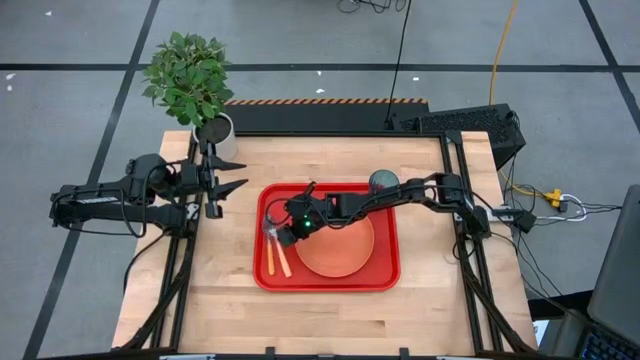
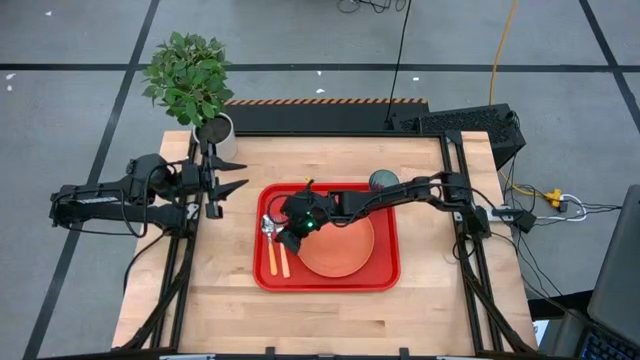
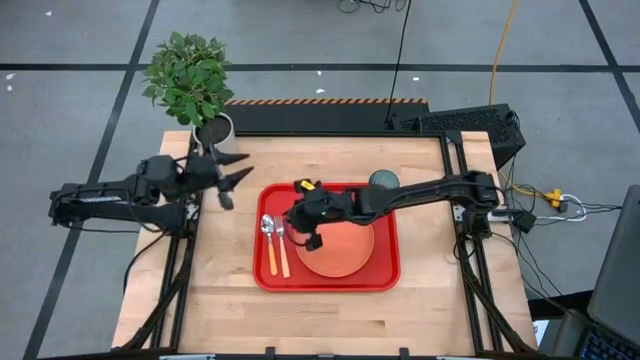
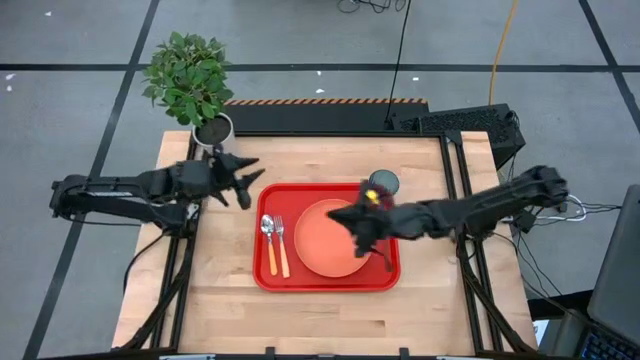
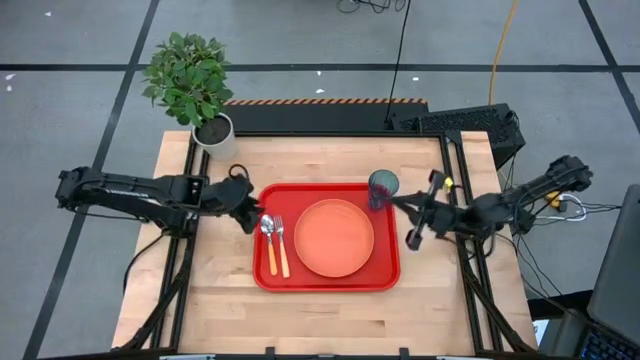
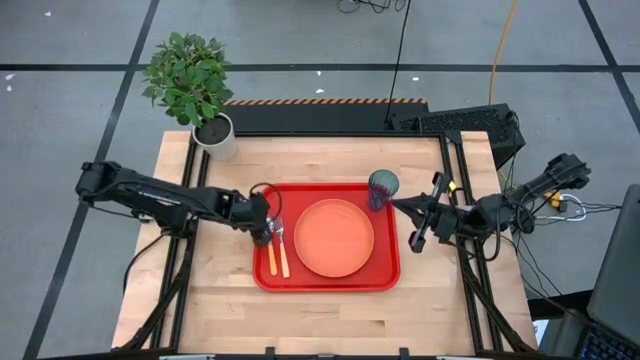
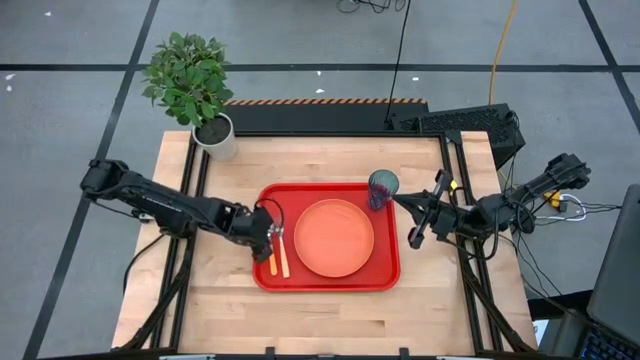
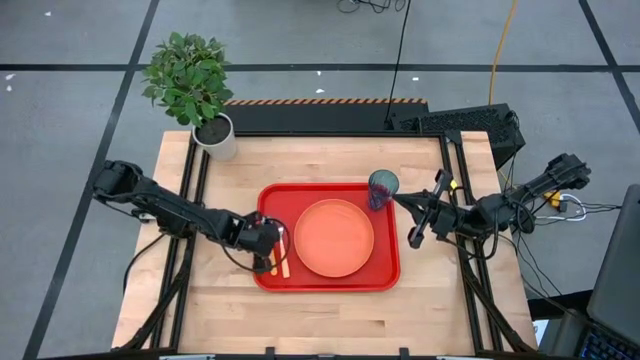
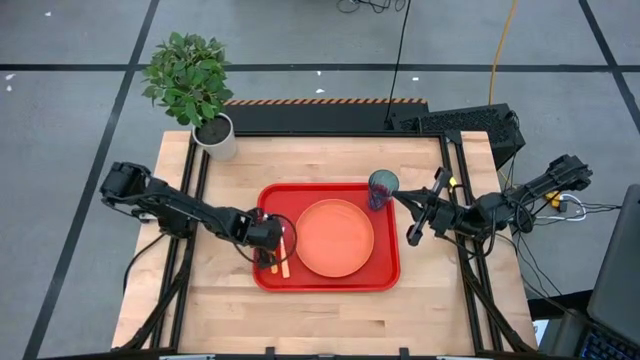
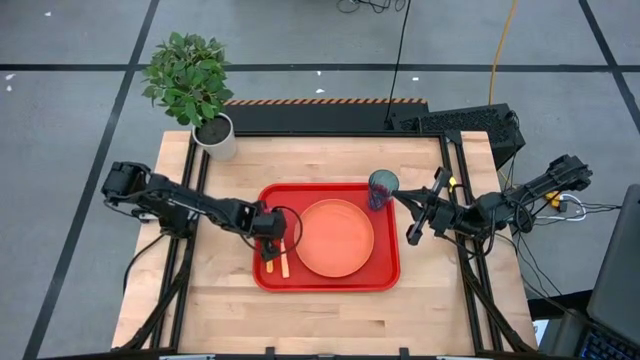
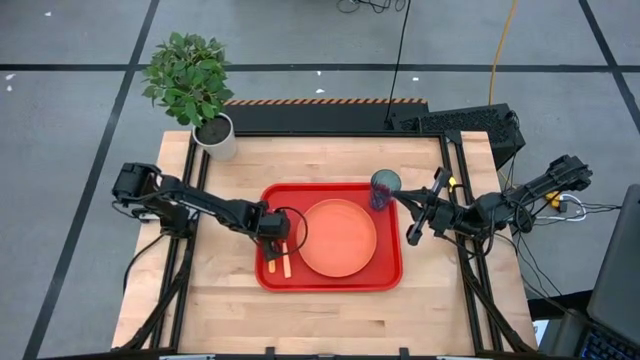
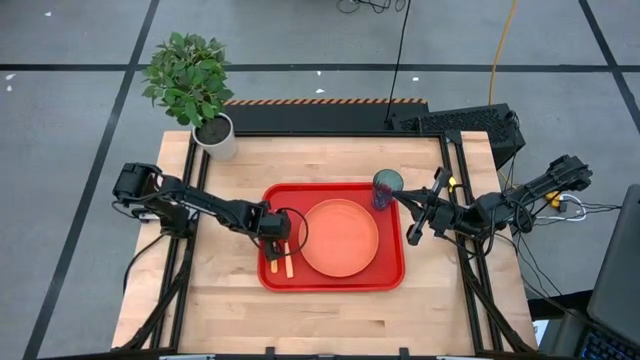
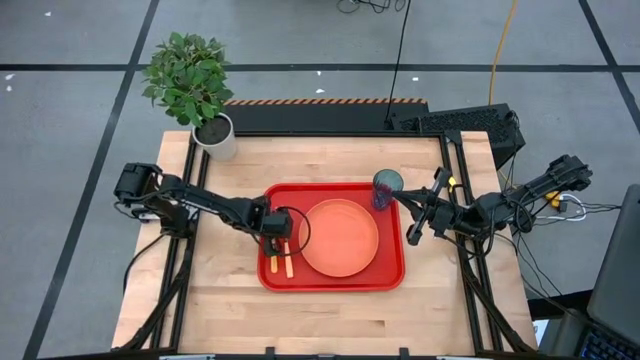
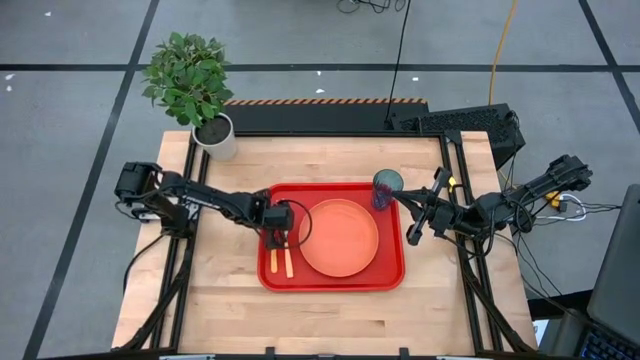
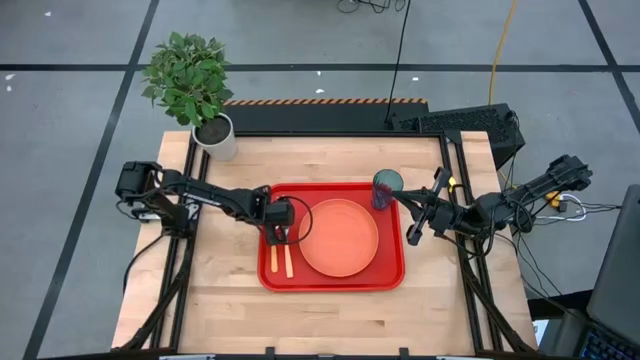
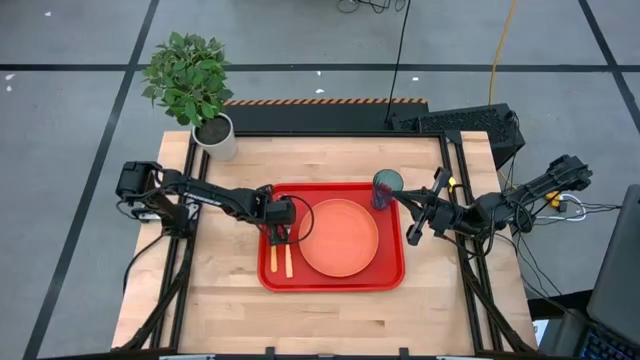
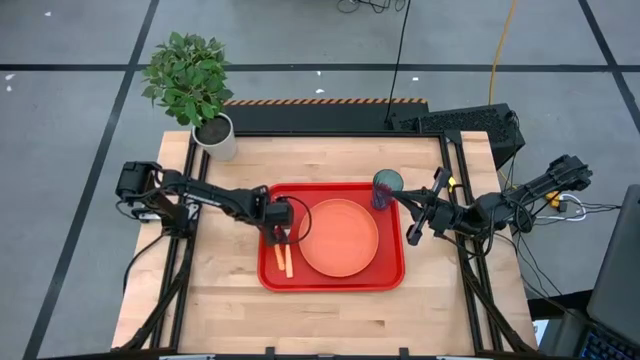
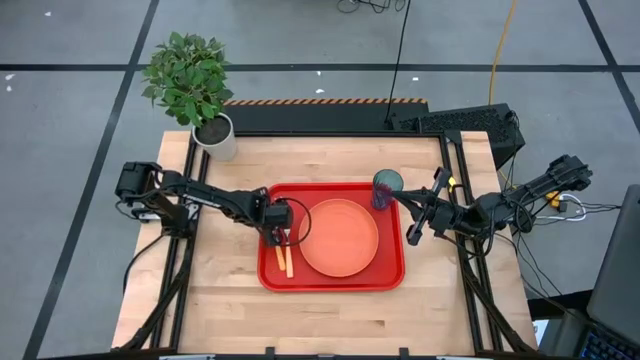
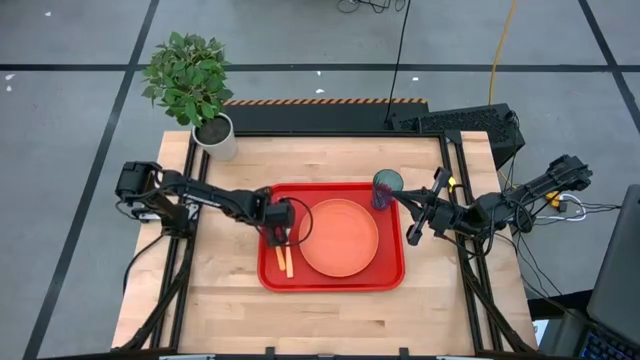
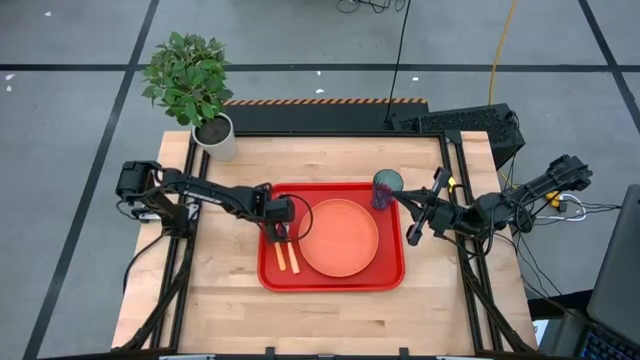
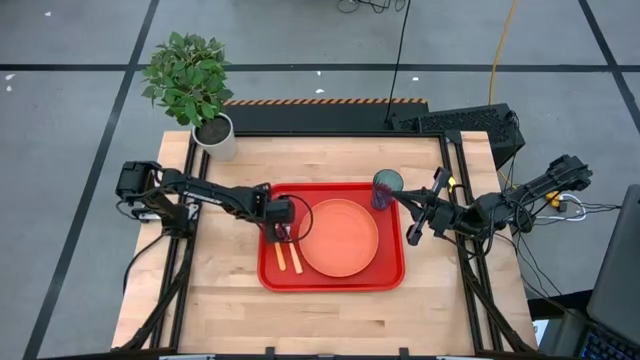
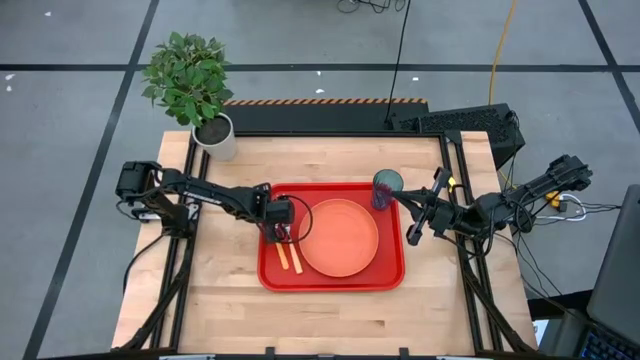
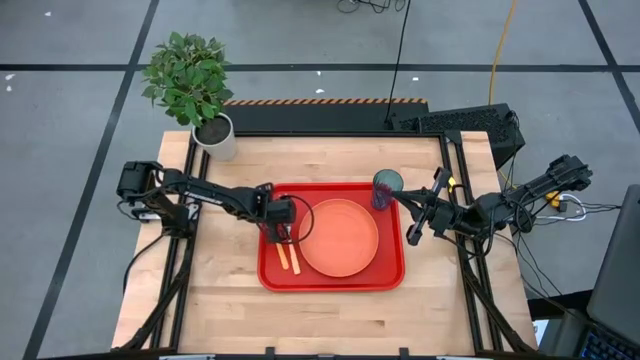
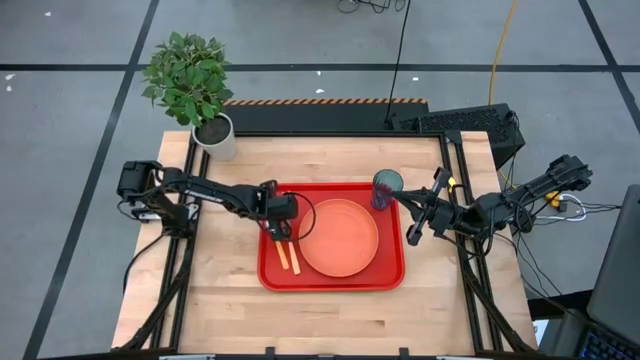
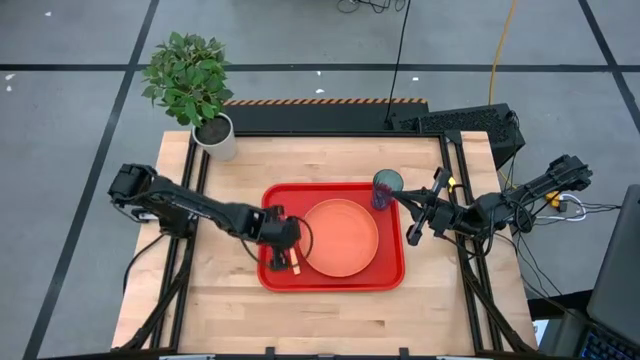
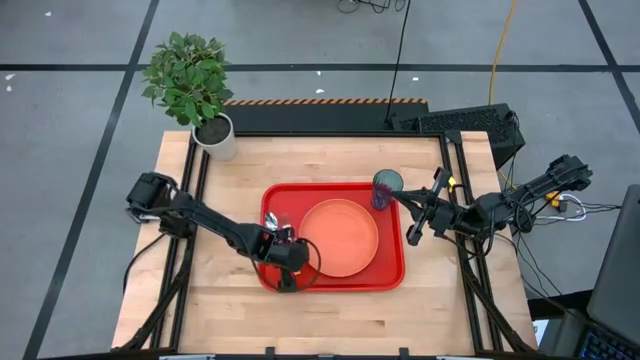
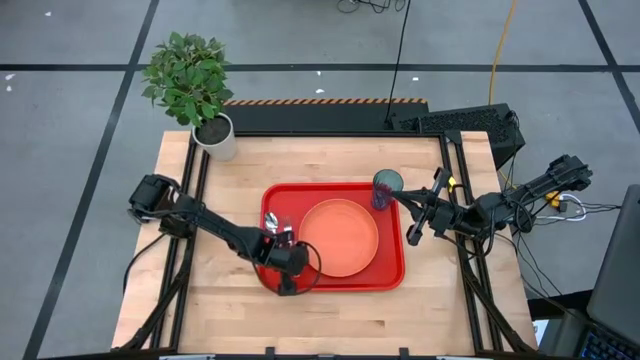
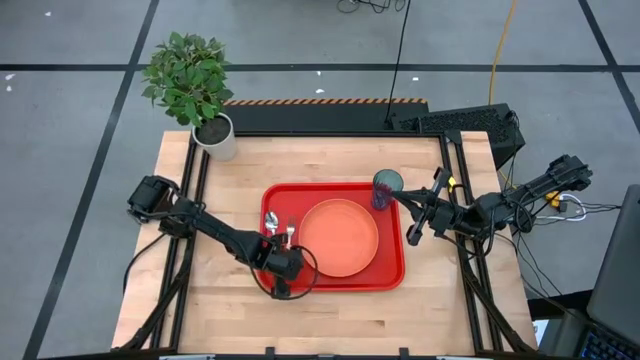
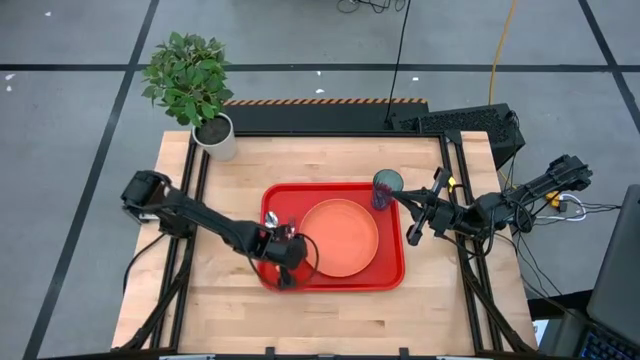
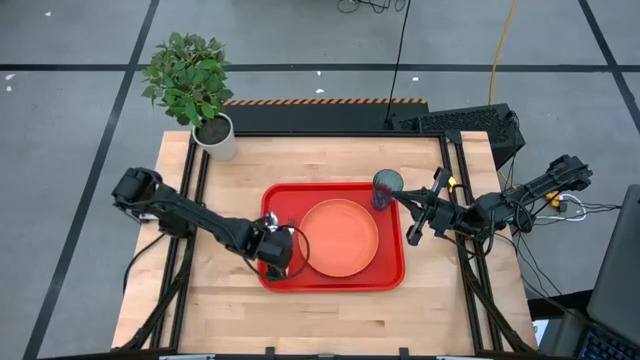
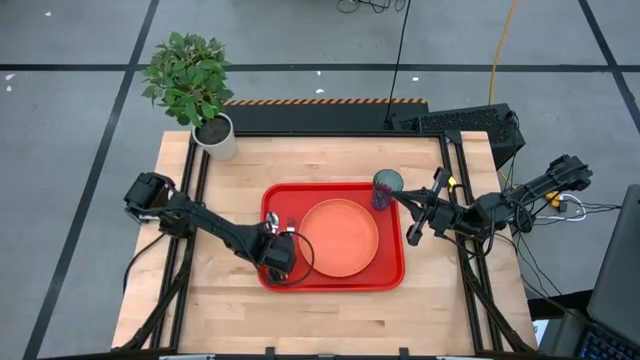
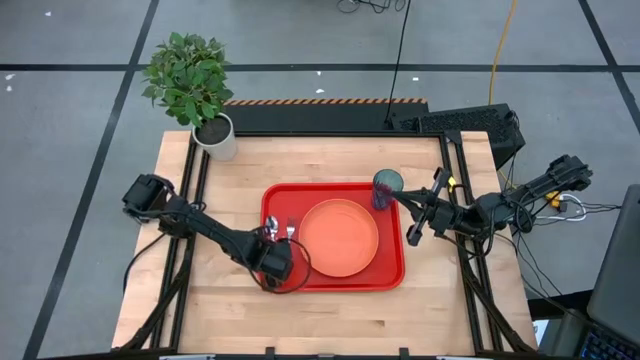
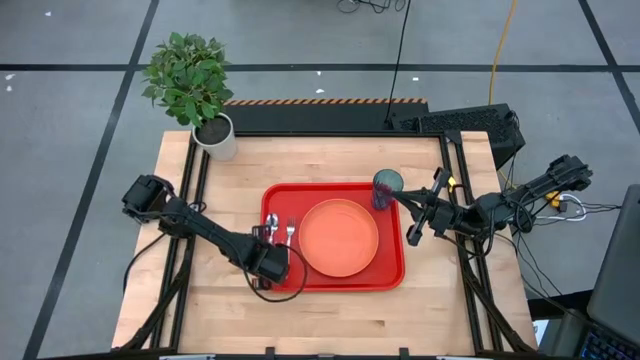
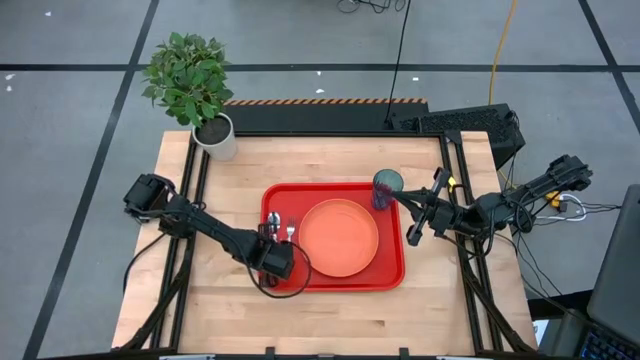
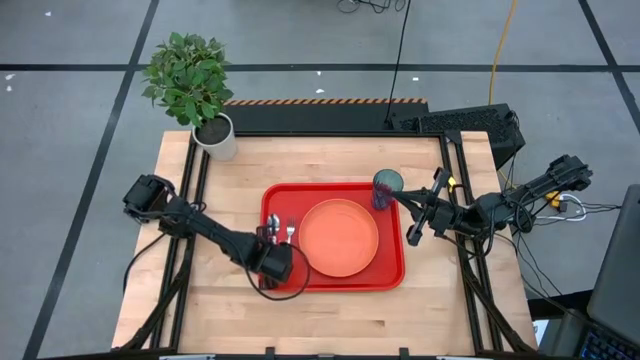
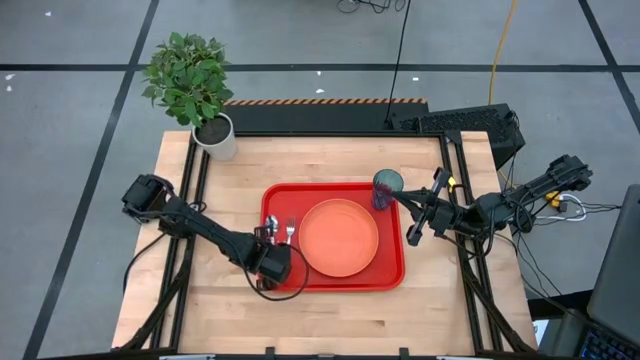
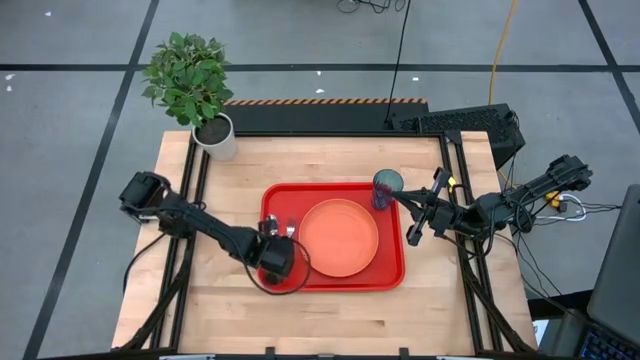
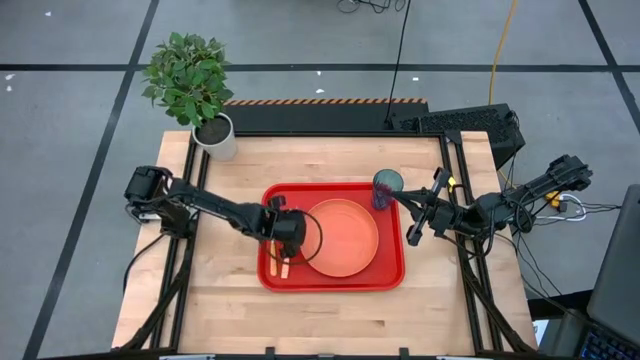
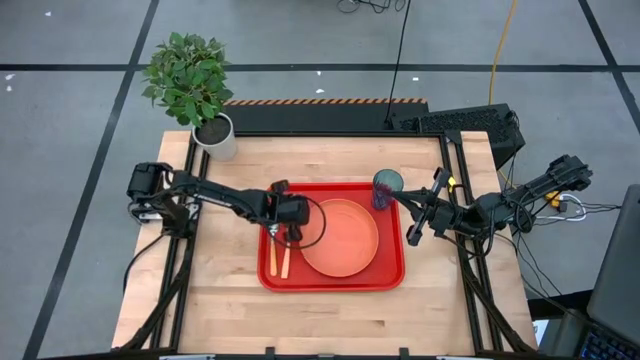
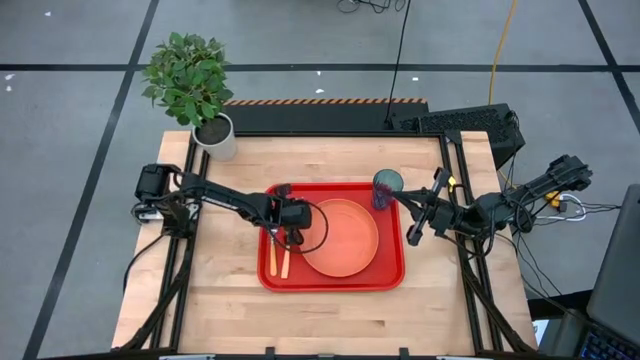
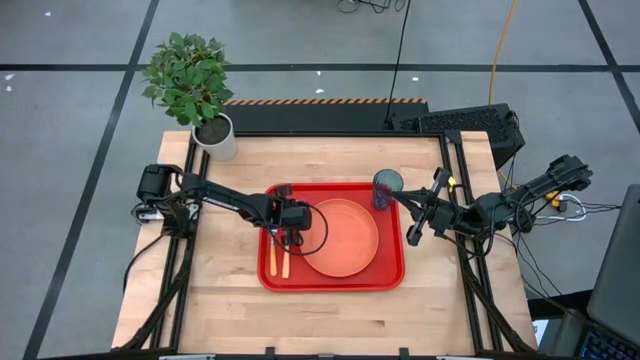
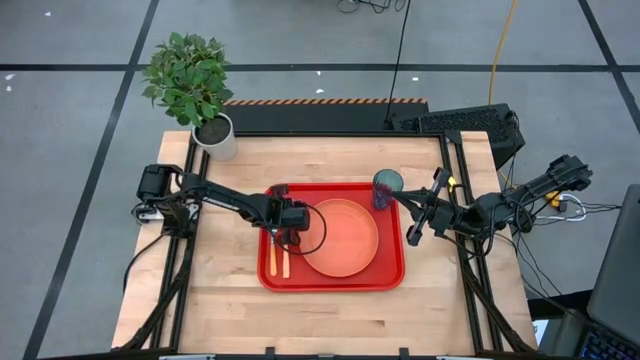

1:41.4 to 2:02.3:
Task: Pick and place plate/cup/fork/spoon on tray
Adjust the utensils on the red tray
